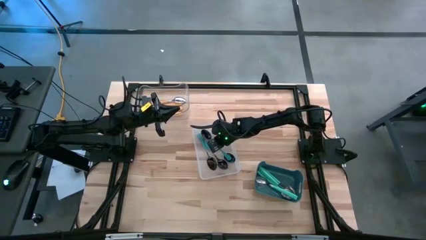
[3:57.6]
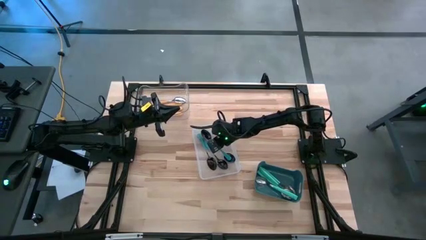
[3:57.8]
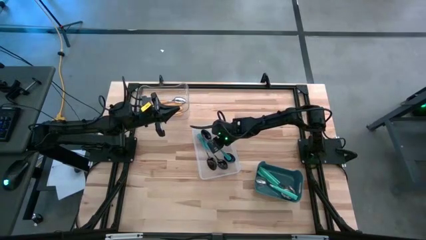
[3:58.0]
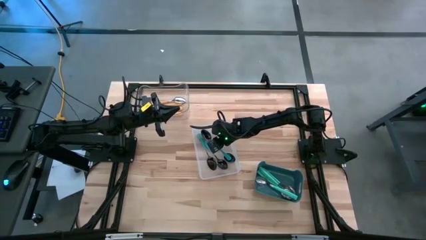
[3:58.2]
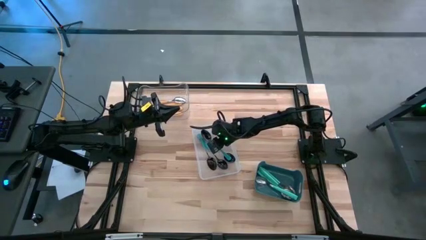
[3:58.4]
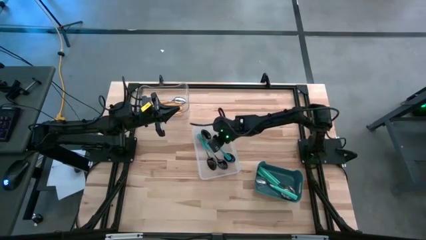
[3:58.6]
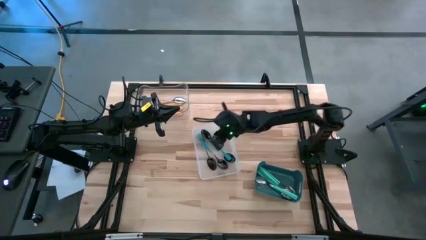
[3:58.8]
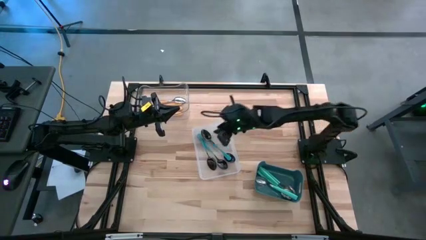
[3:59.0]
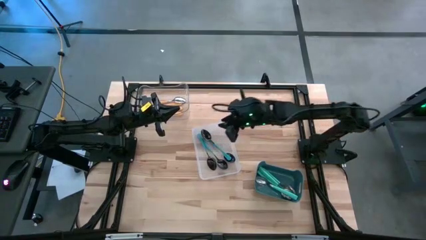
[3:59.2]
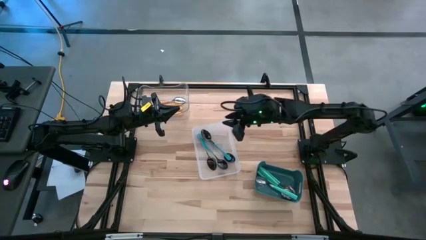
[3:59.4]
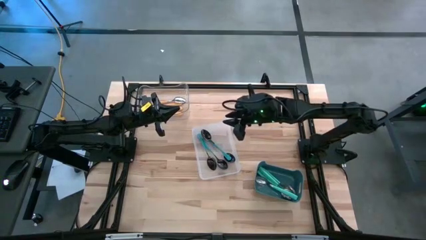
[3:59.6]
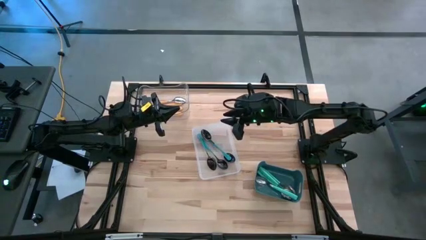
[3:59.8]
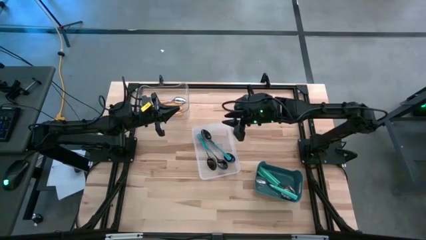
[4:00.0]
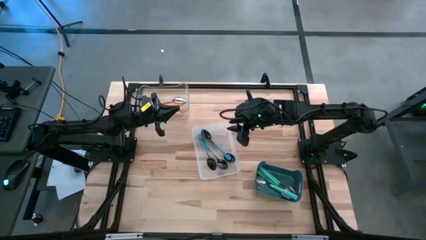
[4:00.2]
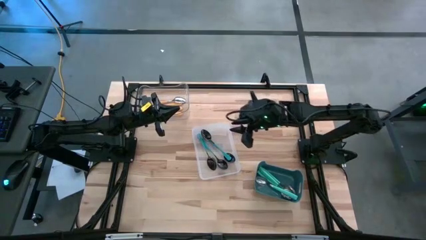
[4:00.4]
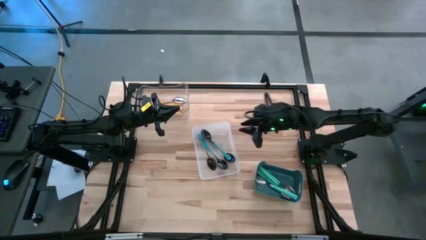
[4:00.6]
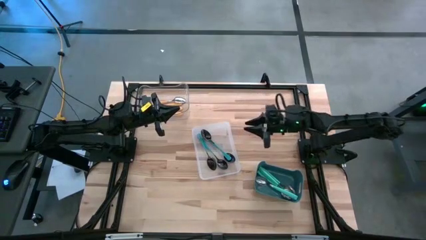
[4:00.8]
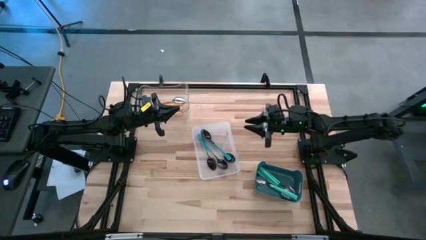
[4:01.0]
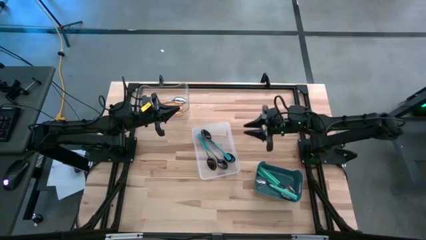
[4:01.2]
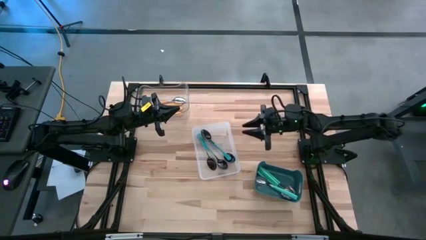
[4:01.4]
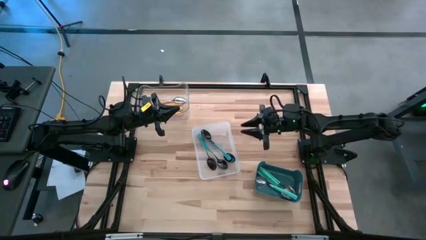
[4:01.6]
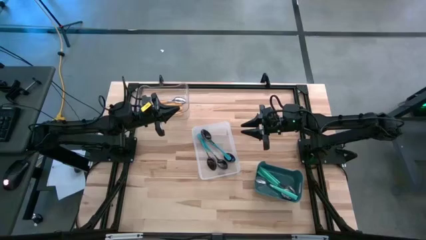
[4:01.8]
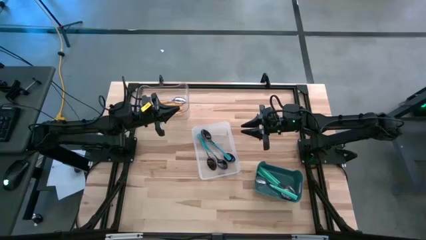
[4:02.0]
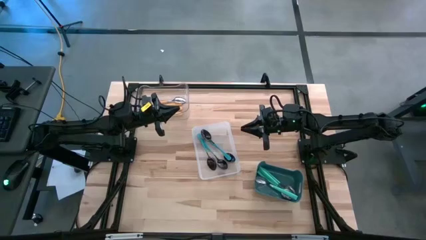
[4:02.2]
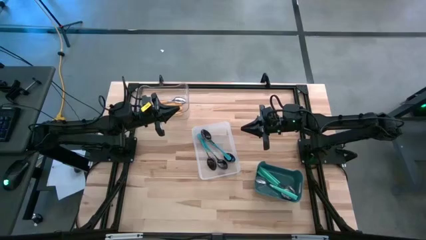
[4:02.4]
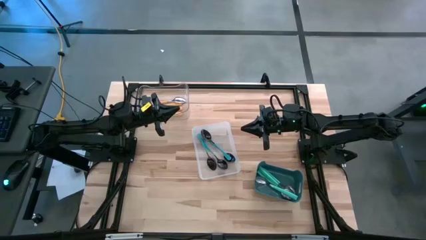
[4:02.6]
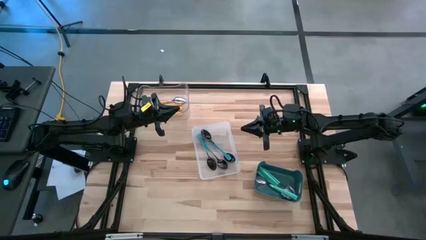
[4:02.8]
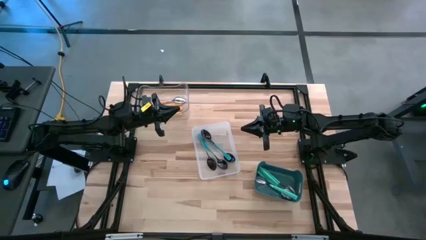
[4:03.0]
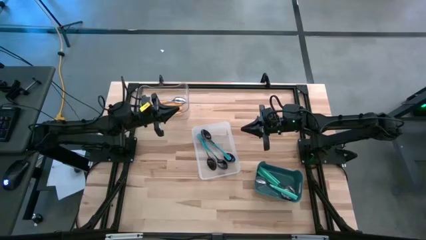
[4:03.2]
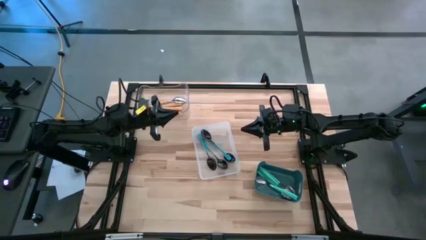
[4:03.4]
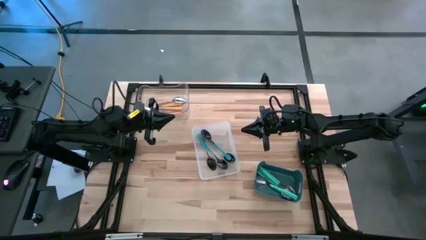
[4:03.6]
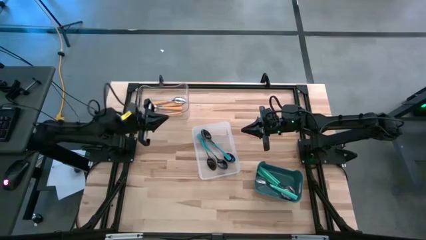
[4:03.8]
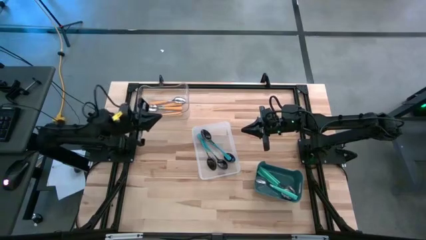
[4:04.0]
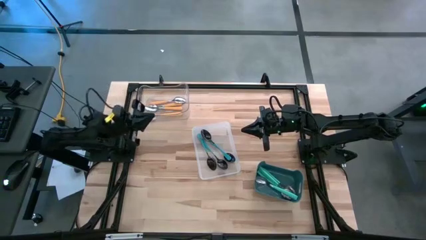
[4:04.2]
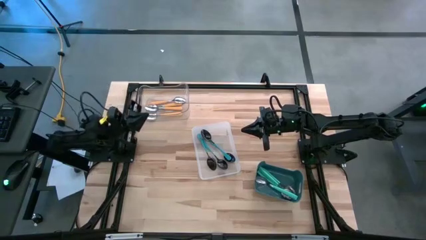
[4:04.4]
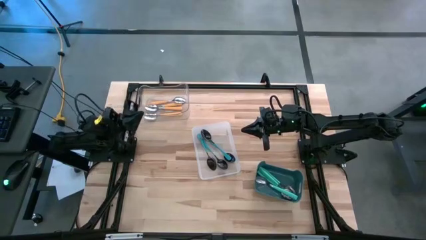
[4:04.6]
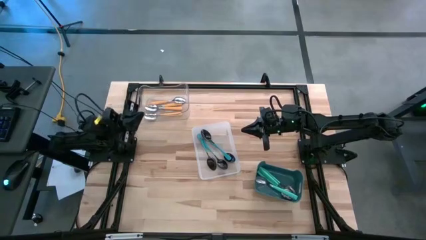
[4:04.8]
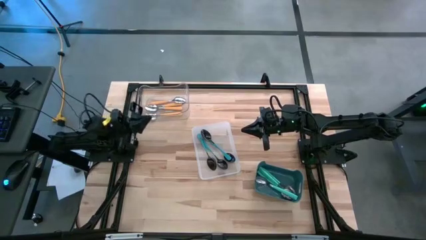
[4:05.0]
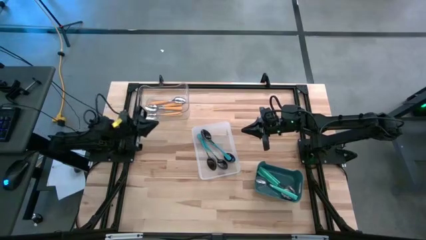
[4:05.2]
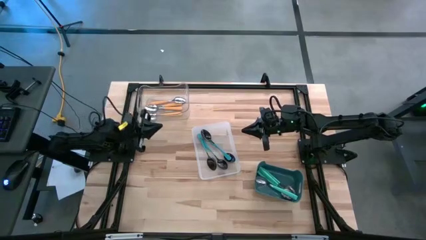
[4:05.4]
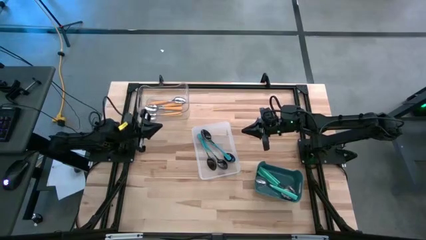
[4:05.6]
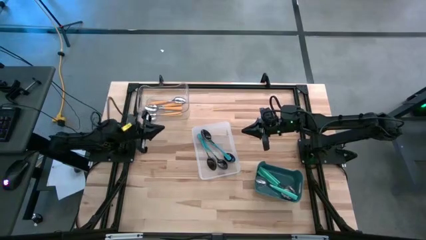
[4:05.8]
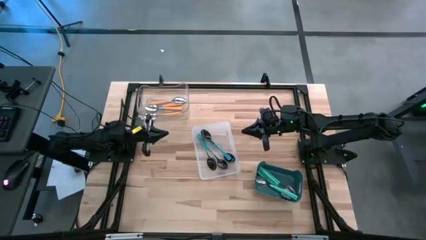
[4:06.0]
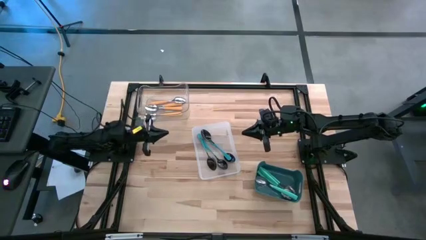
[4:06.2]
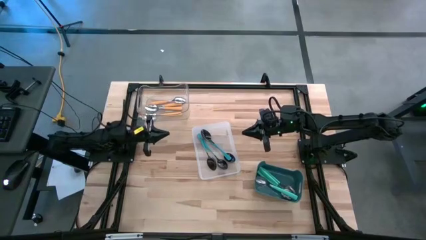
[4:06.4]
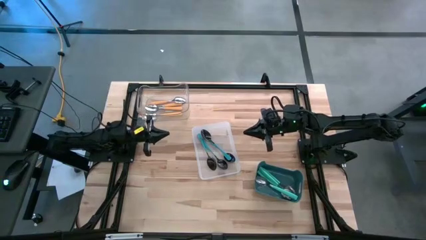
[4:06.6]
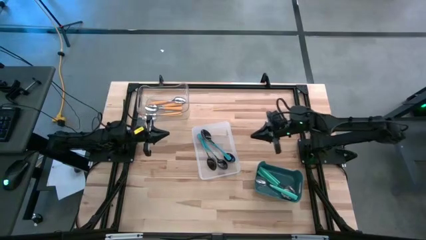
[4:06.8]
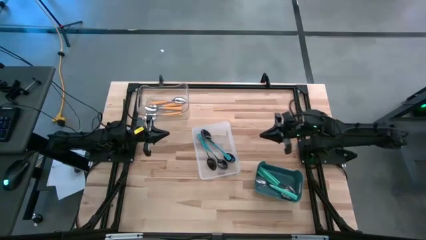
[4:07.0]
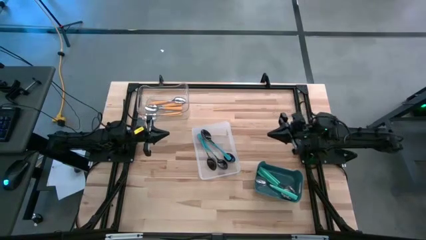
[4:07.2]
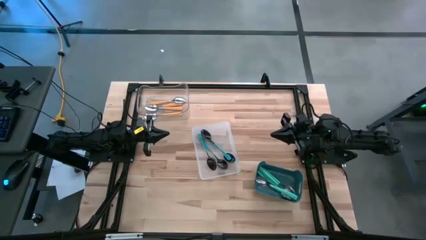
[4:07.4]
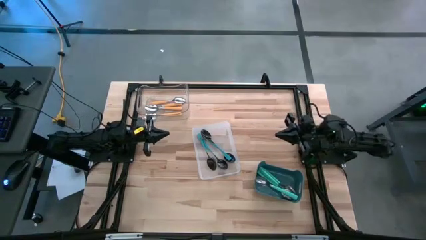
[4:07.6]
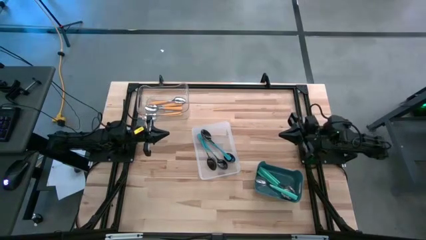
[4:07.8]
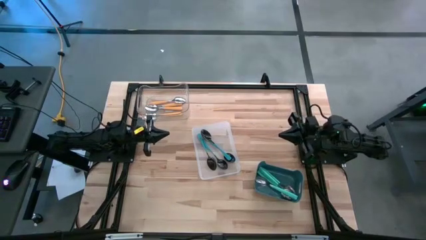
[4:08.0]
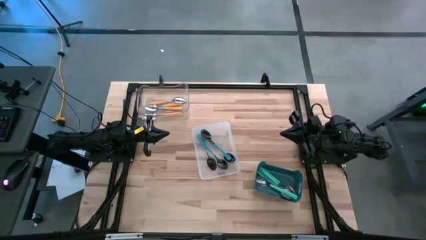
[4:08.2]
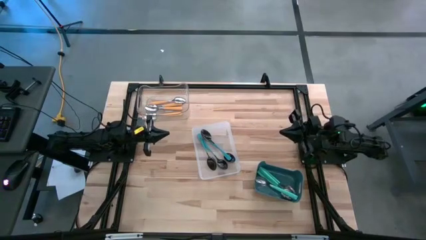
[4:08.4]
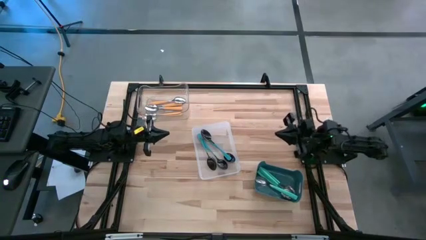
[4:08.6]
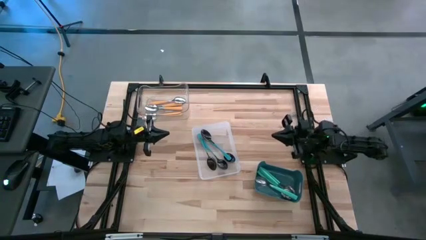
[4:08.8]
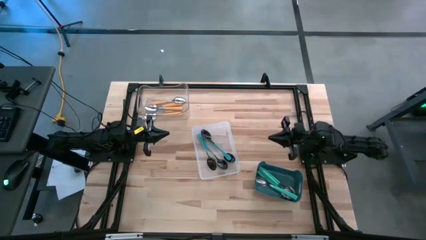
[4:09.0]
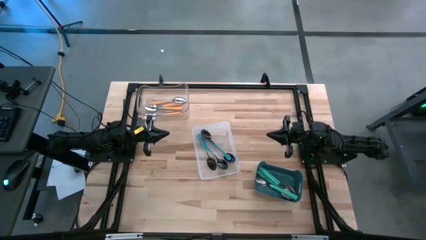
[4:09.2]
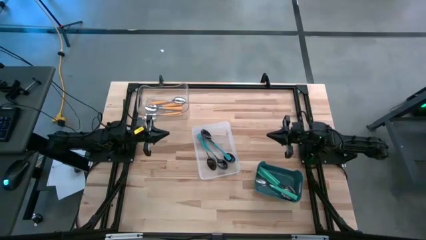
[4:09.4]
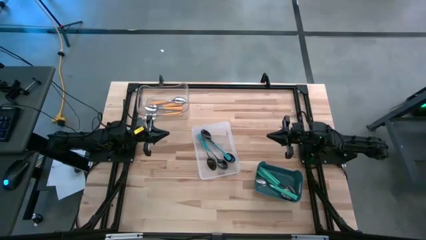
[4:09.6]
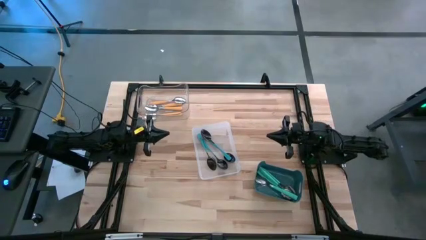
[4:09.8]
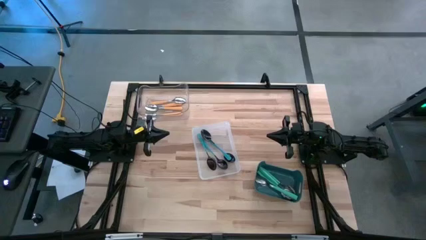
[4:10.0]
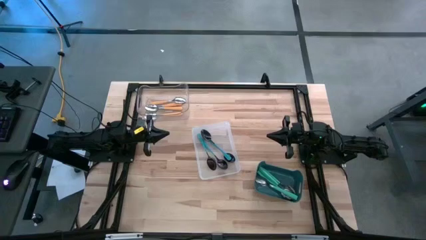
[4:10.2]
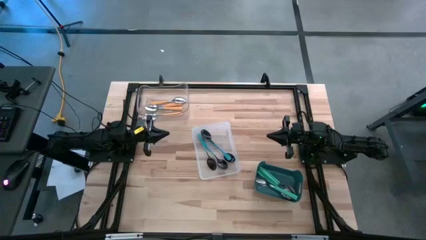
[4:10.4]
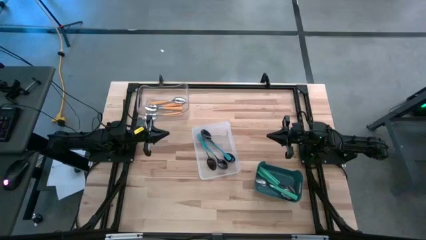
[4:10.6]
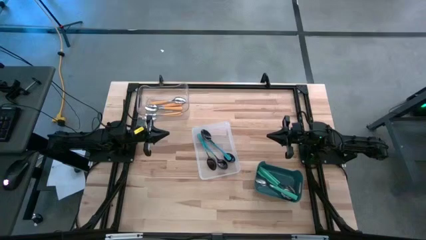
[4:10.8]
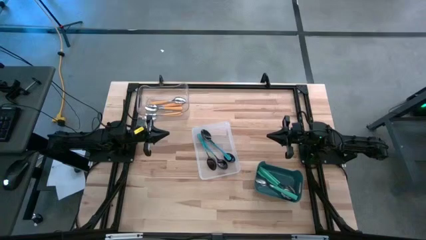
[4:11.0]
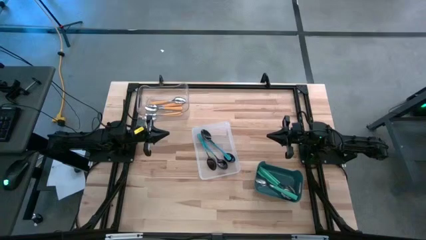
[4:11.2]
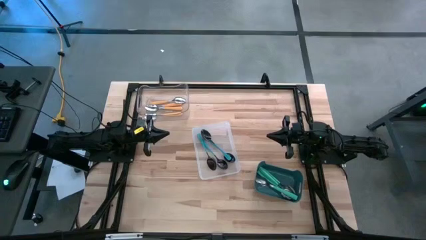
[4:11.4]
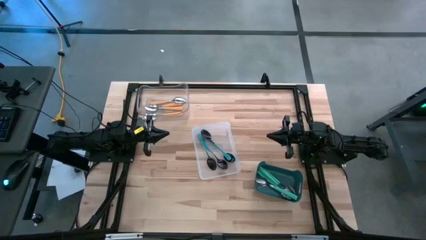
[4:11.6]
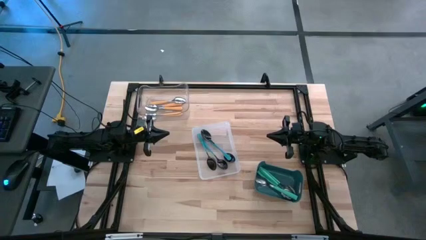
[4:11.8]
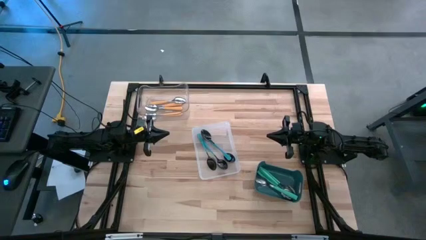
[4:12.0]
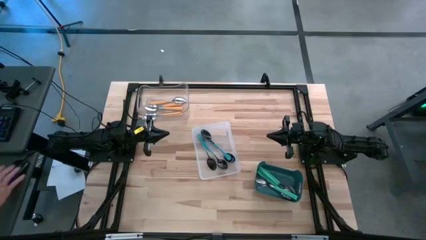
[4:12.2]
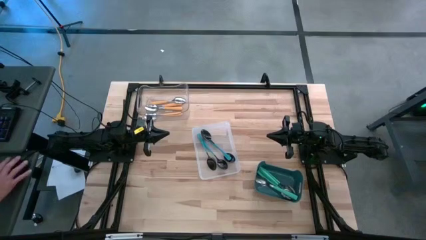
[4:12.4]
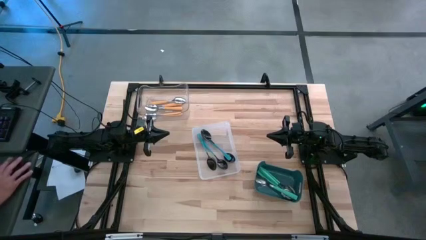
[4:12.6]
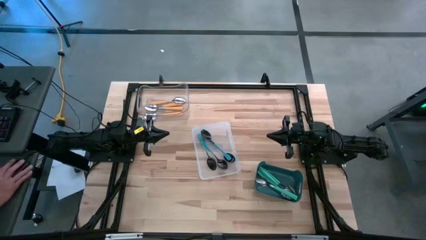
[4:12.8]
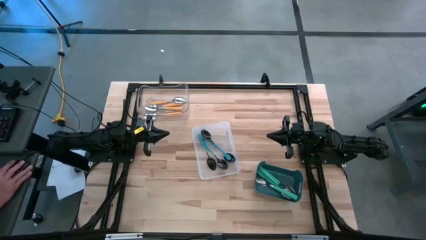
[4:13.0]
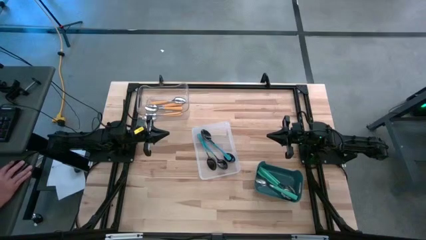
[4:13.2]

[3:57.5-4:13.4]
Task: Sort silverware by color (type)
Return to Home Position
